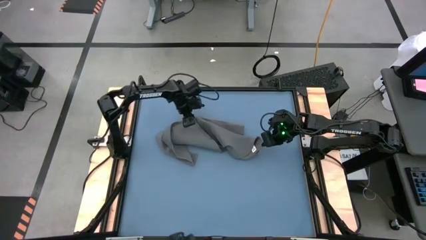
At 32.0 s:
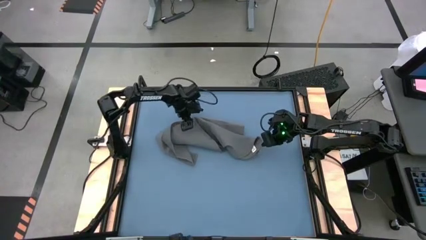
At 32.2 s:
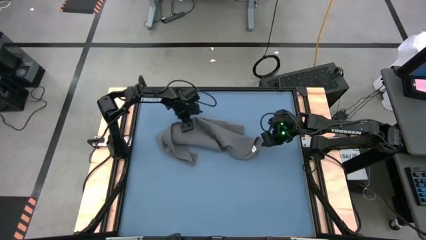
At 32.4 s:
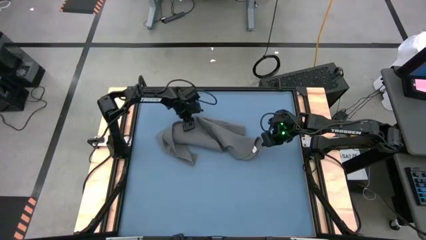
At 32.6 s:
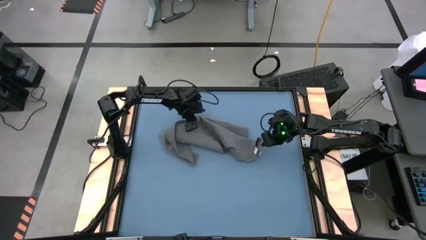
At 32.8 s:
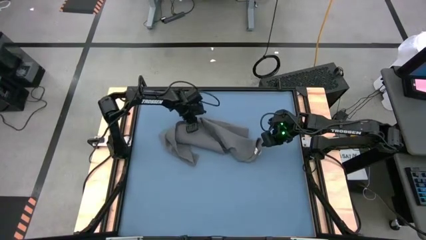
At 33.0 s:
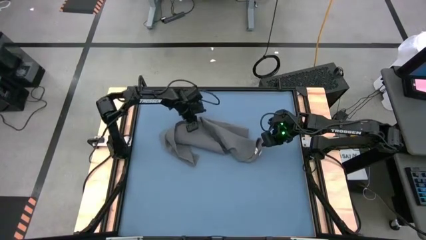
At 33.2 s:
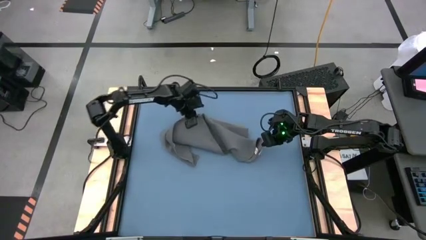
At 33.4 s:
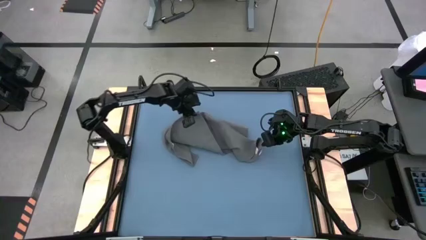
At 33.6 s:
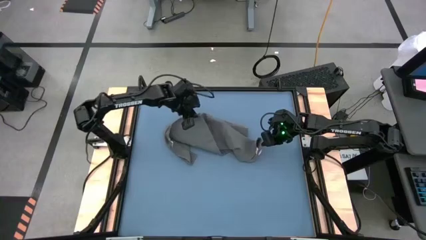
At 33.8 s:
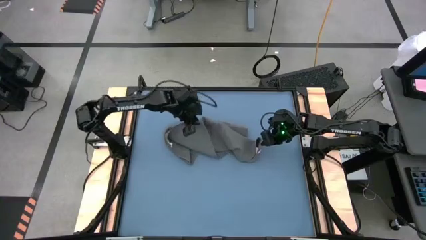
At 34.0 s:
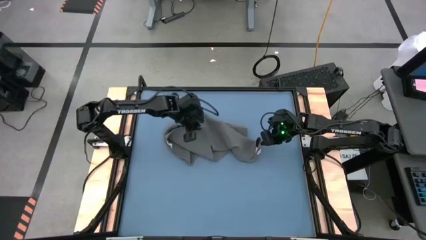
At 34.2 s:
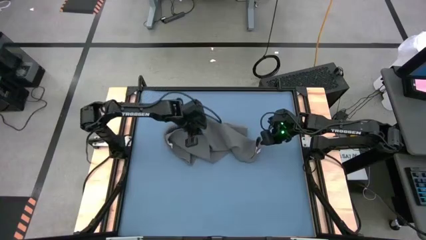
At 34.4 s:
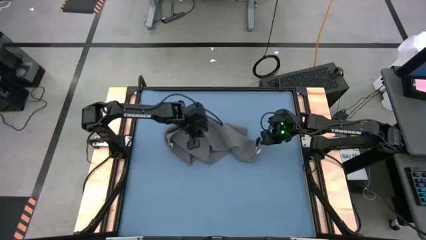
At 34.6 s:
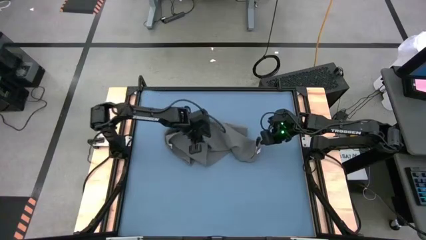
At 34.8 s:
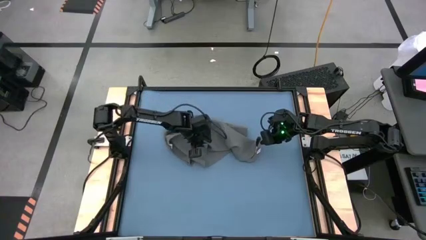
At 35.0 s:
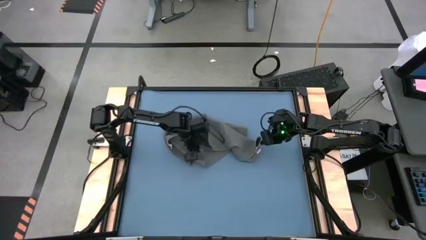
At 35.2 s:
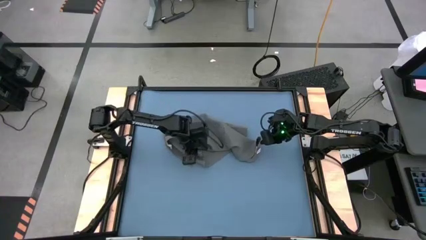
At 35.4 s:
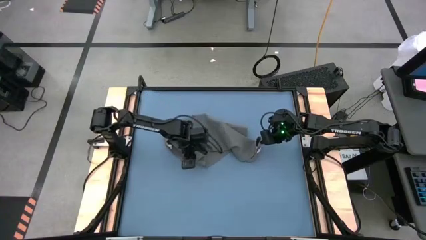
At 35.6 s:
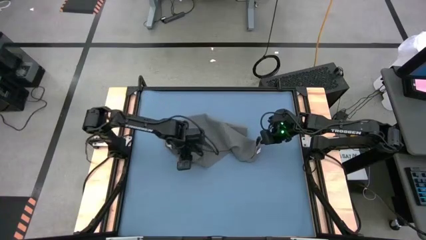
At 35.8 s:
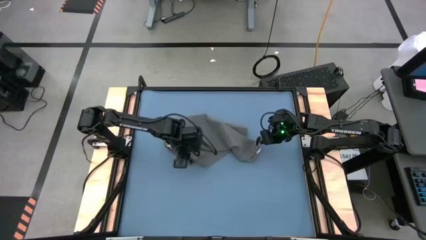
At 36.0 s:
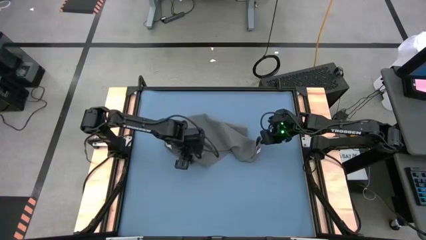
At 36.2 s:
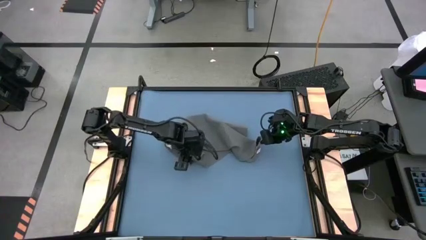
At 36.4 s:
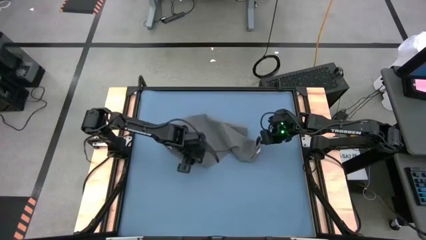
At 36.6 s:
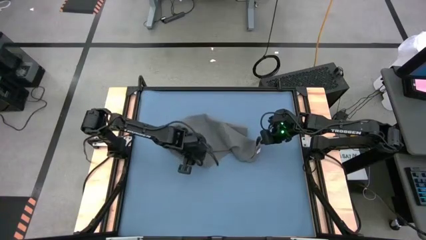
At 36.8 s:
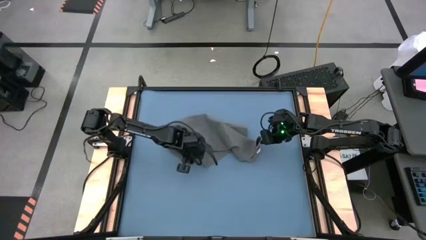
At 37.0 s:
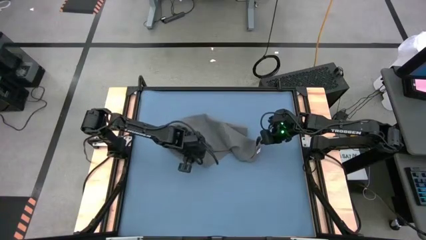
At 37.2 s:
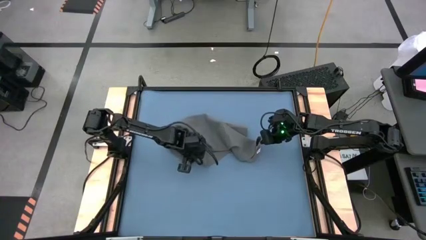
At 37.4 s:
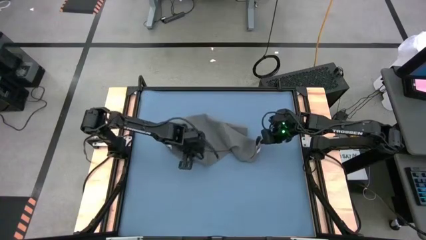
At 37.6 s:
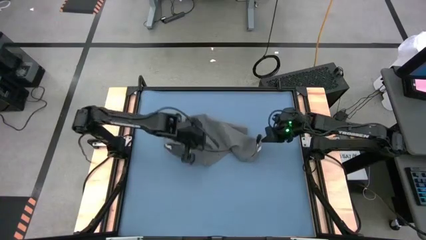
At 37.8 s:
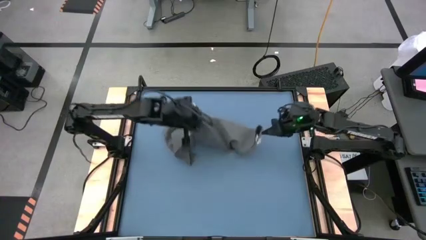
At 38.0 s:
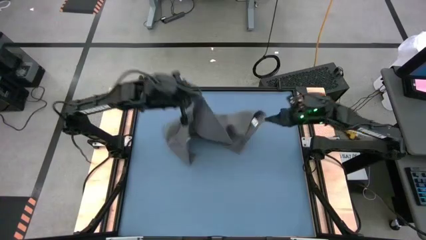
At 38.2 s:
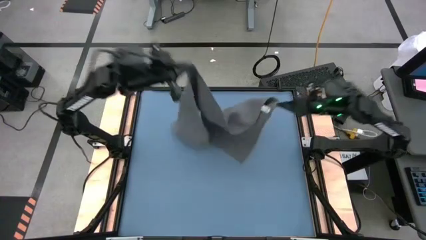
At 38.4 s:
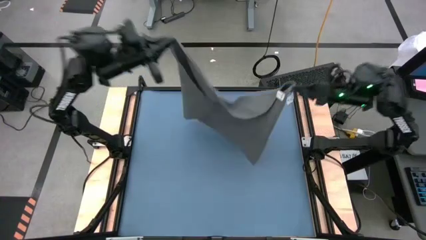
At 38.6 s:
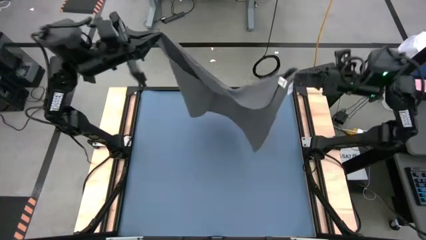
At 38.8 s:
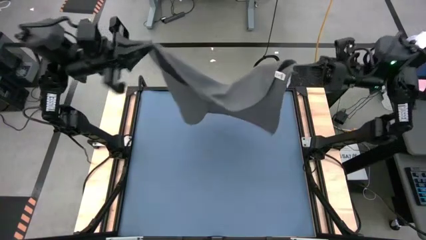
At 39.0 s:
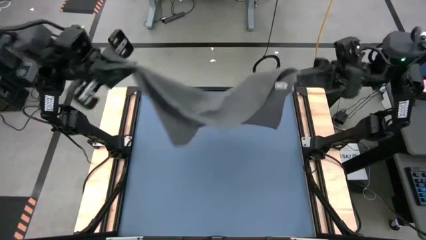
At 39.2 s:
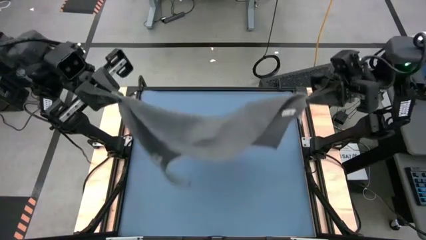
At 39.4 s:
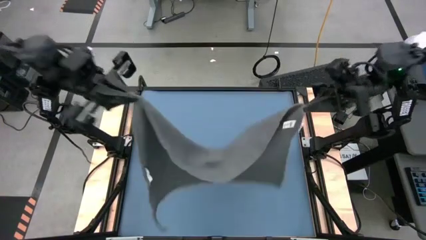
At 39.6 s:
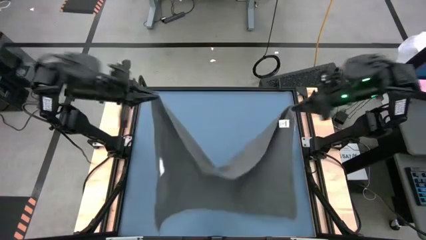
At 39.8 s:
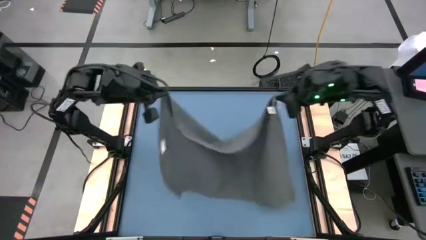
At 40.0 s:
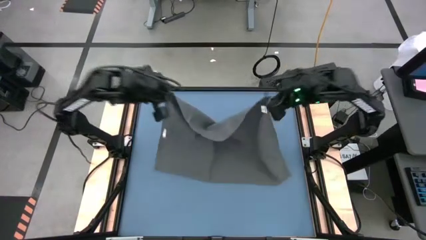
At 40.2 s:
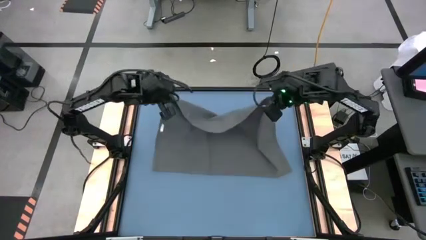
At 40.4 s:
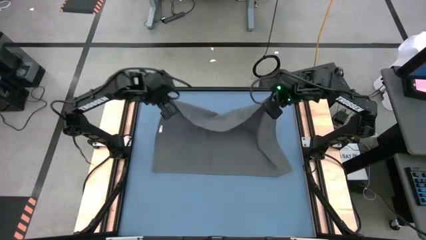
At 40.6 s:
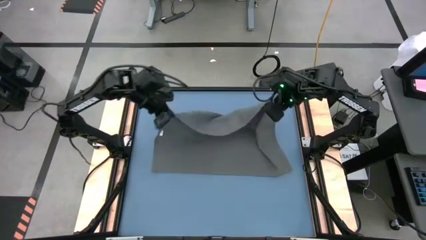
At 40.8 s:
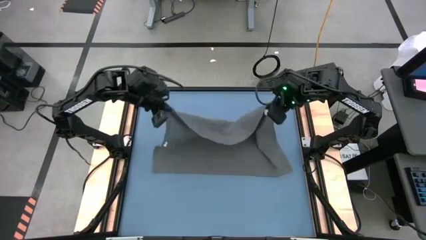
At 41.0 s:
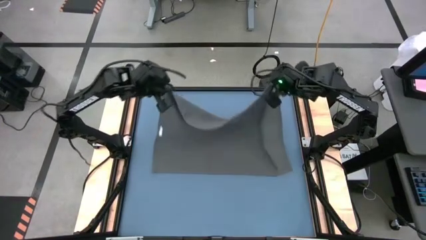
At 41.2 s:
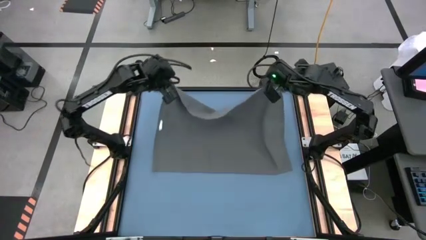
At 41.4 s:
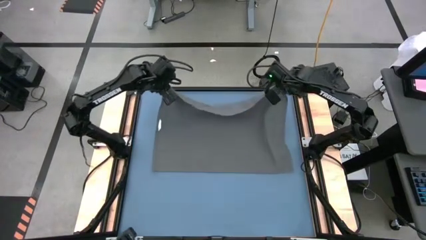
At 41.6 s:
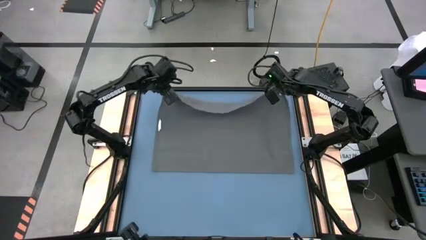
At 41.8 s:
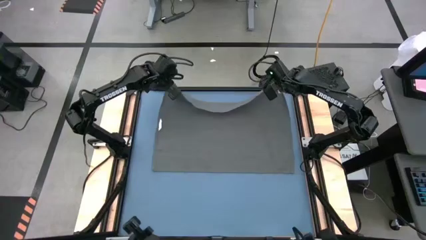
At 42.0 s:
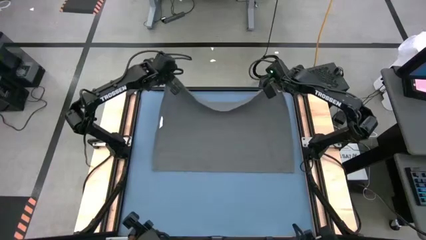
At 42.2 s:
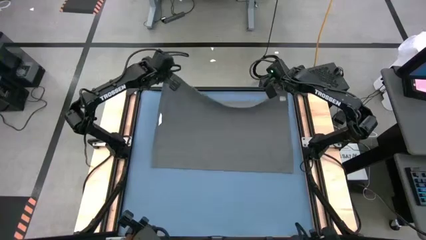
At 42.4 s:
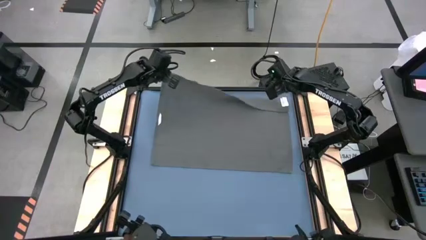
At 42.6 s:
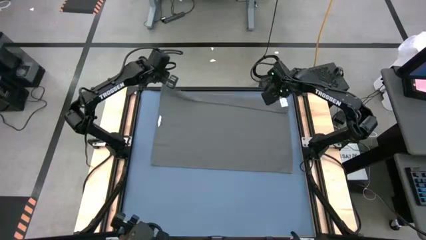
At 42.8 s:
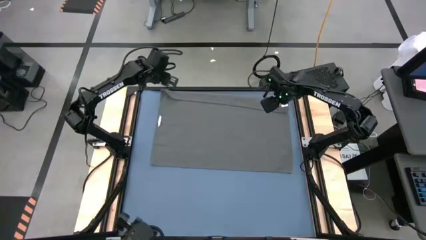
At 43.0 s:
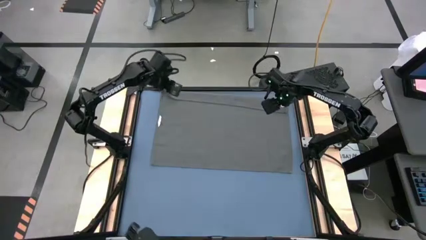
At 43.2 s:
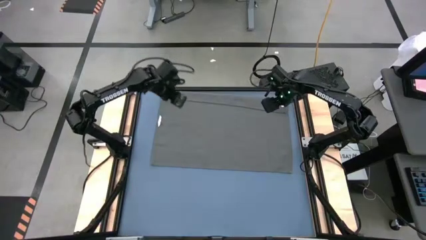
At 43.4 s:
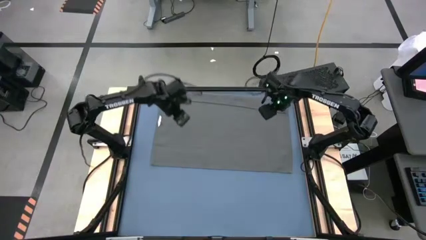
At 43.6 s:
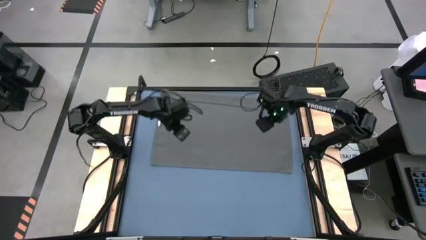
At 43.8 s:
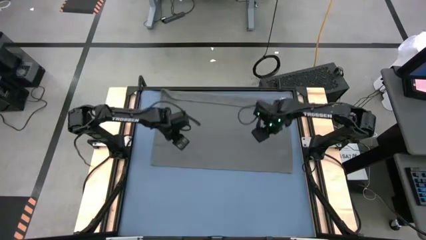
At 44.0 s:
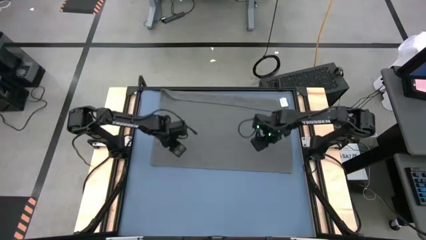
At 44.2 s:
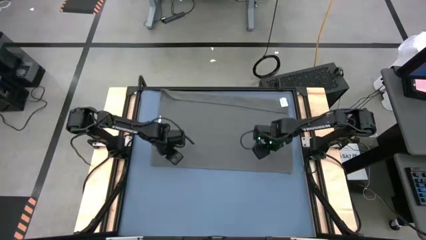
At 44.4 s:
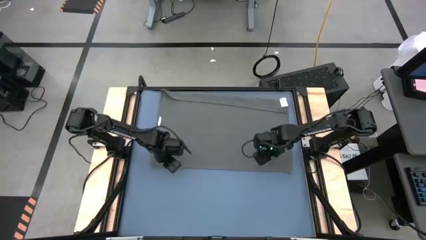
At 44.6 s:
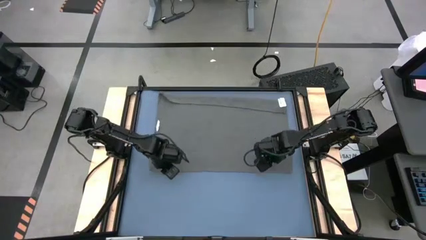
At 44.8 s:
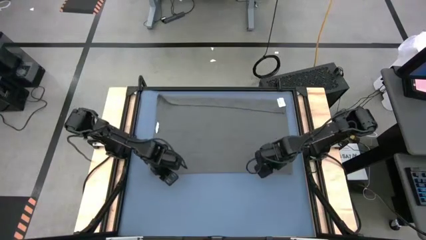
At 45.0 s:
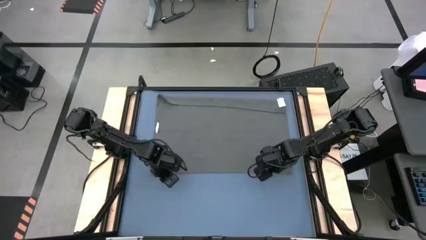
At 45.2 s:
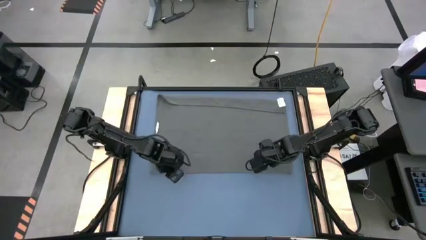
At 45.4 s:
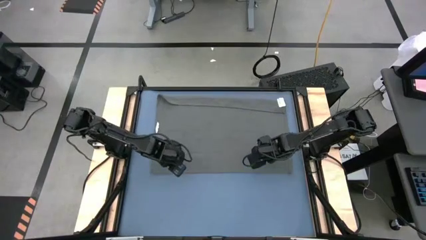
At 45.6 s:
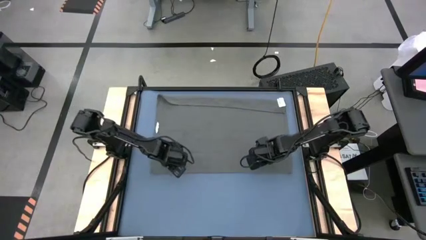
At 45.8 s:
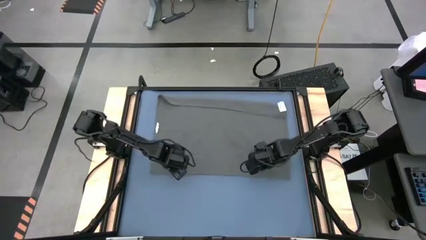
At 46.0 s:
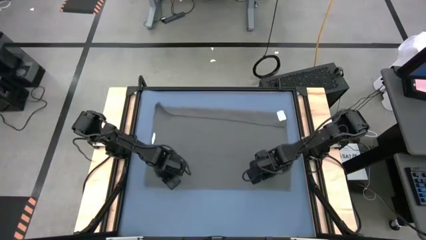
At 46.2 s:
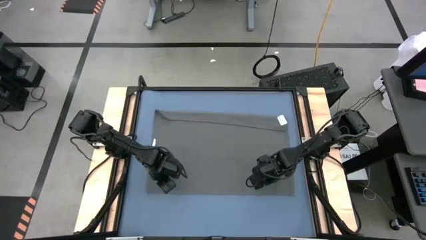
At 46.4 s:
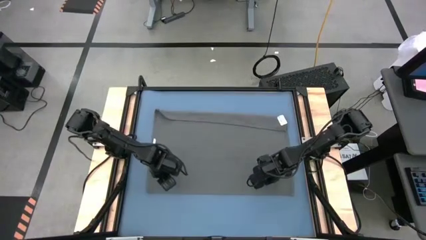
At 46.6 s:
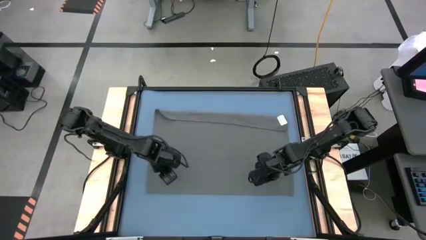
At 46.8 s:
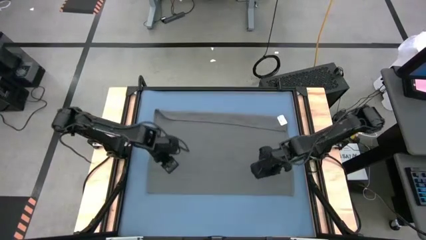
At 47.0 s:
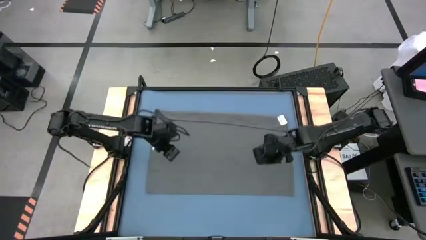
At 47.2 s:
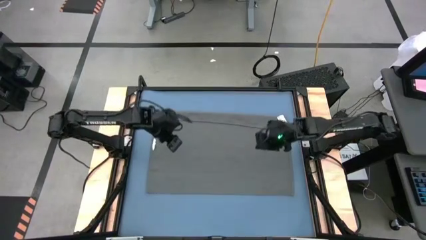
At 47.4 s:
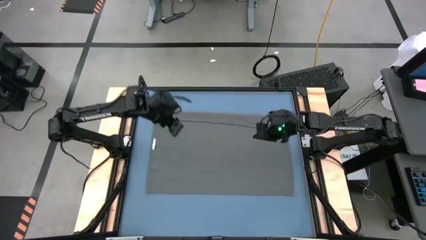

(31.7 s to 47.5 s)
Task: Roll towel
Fold the gray towel
